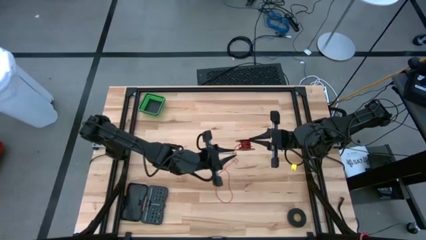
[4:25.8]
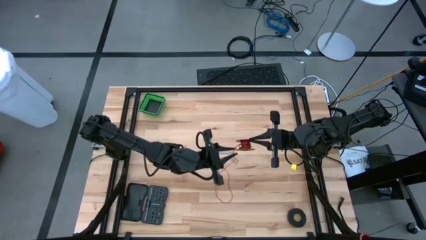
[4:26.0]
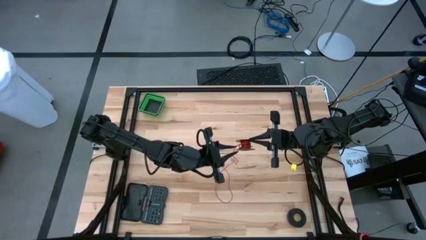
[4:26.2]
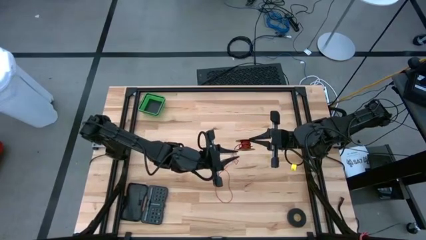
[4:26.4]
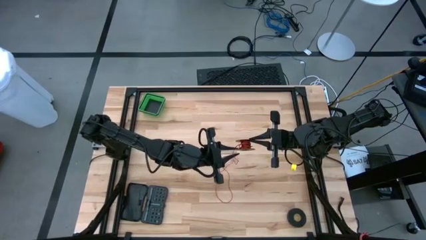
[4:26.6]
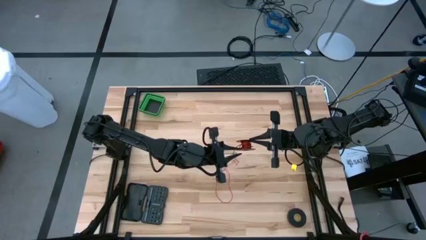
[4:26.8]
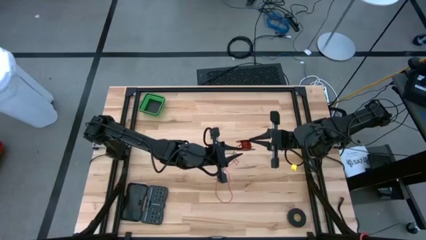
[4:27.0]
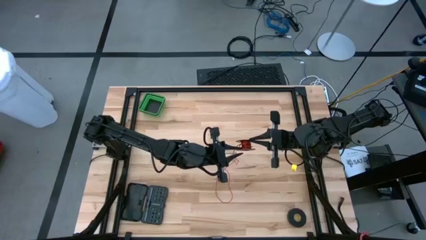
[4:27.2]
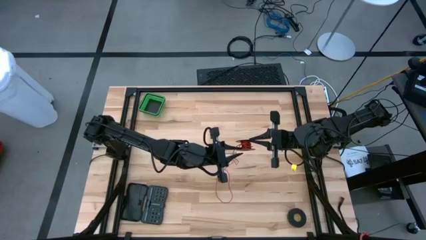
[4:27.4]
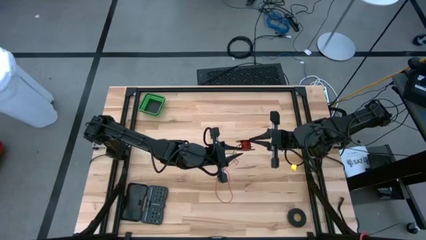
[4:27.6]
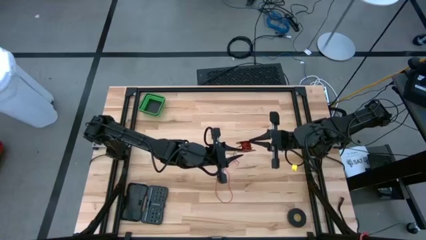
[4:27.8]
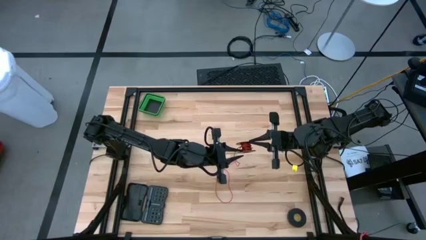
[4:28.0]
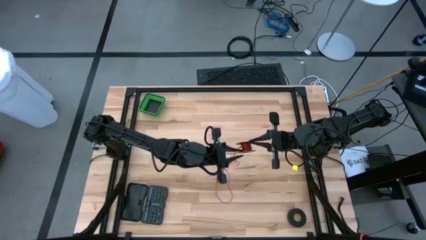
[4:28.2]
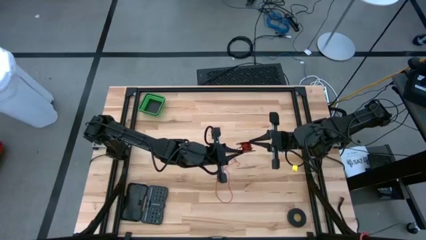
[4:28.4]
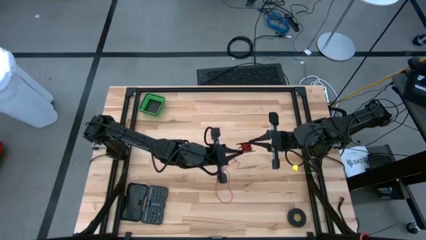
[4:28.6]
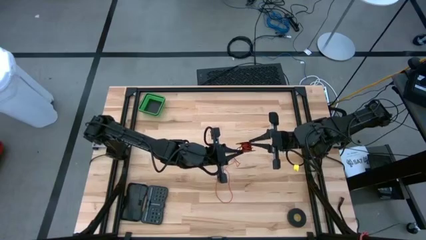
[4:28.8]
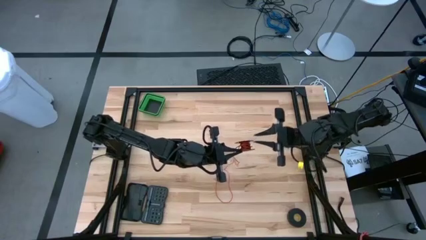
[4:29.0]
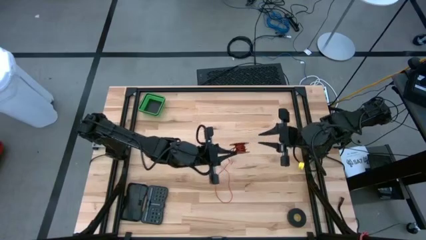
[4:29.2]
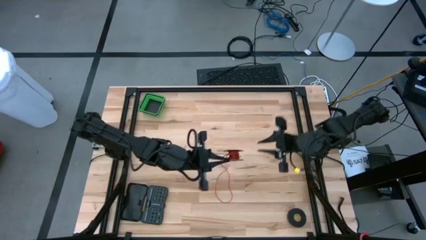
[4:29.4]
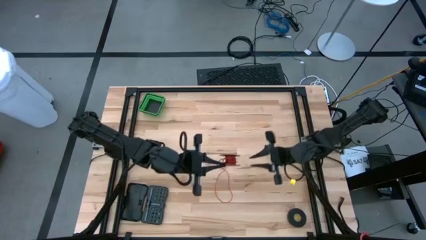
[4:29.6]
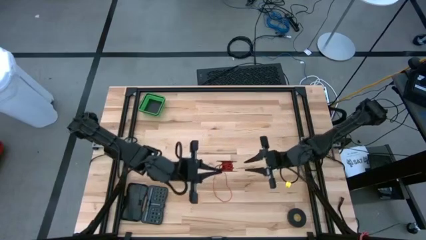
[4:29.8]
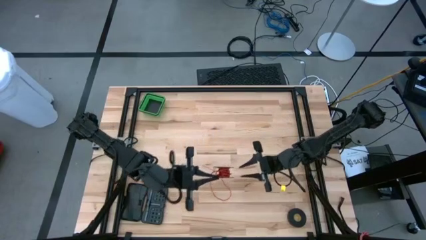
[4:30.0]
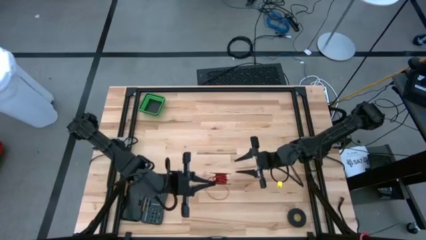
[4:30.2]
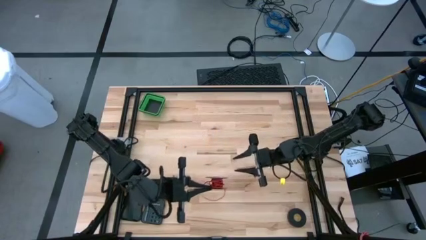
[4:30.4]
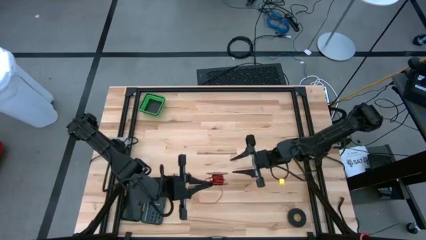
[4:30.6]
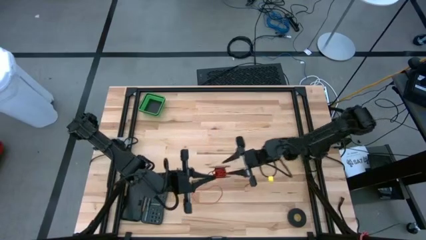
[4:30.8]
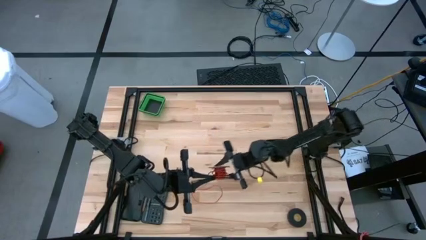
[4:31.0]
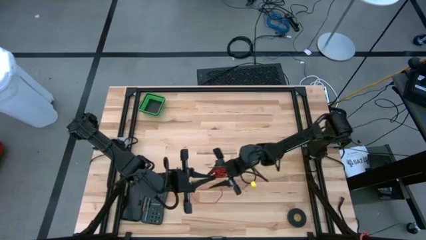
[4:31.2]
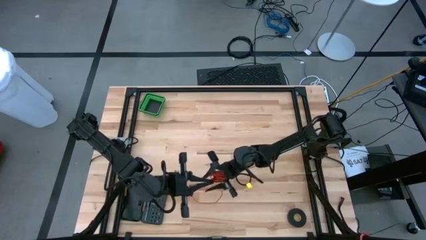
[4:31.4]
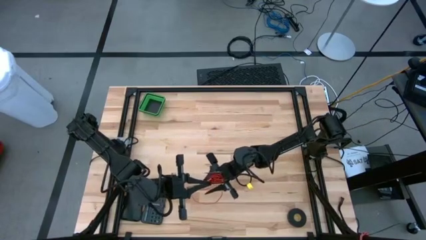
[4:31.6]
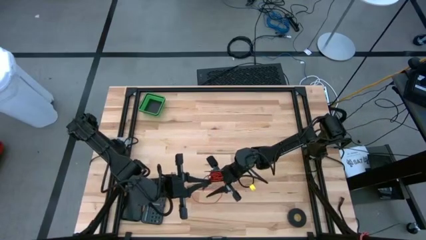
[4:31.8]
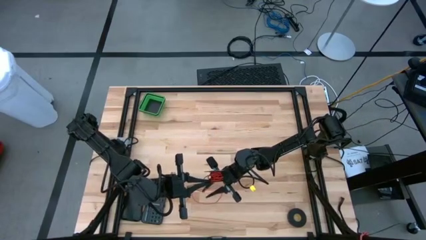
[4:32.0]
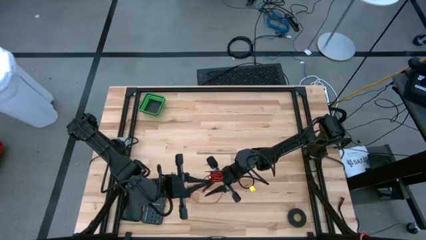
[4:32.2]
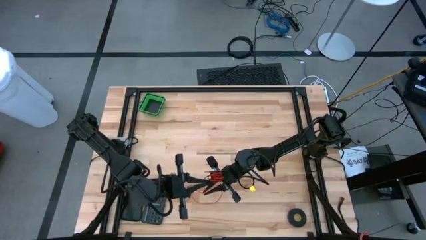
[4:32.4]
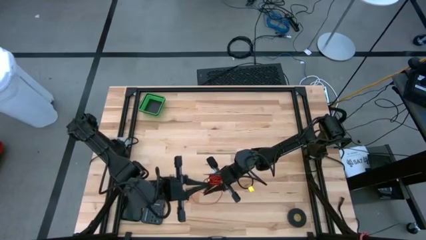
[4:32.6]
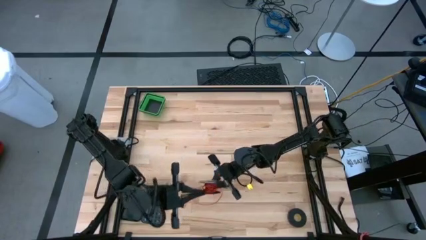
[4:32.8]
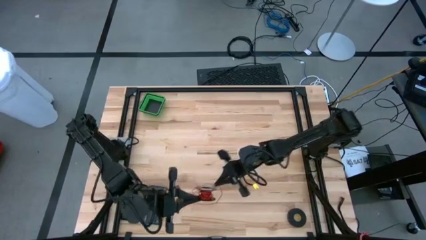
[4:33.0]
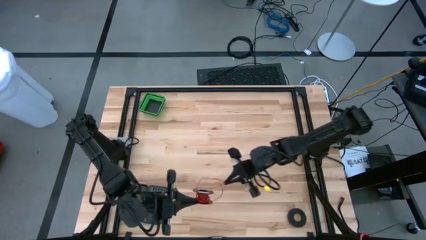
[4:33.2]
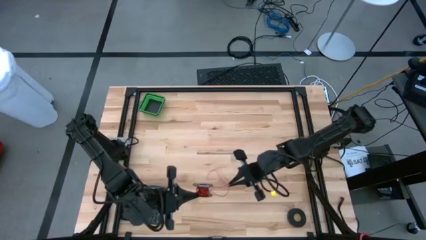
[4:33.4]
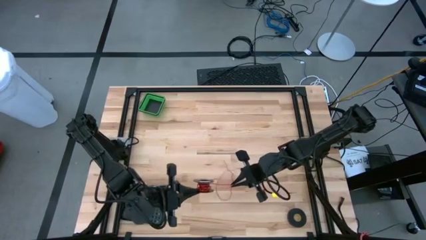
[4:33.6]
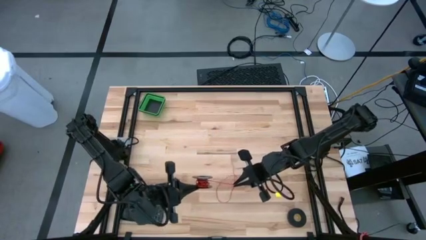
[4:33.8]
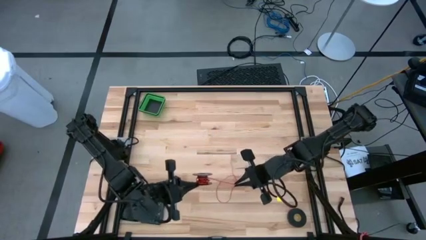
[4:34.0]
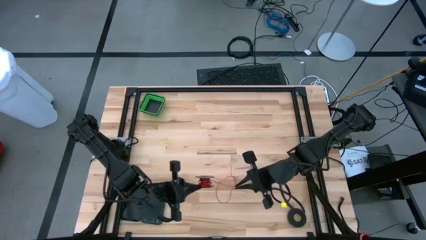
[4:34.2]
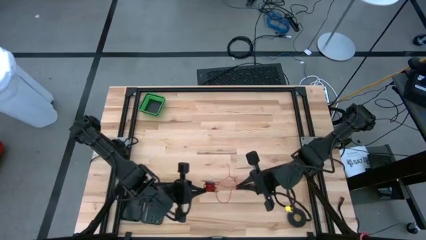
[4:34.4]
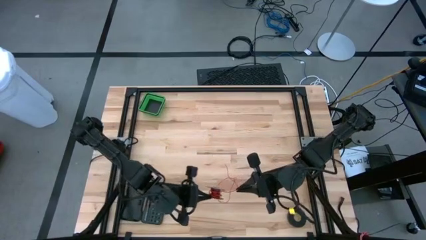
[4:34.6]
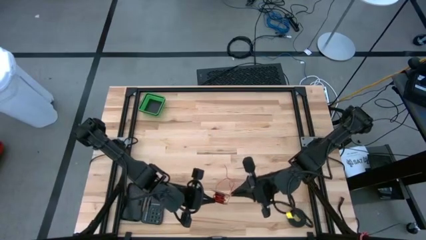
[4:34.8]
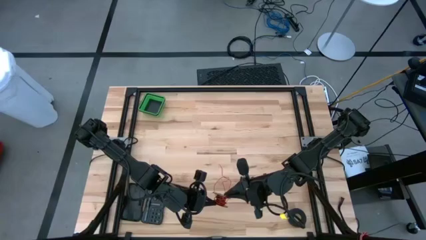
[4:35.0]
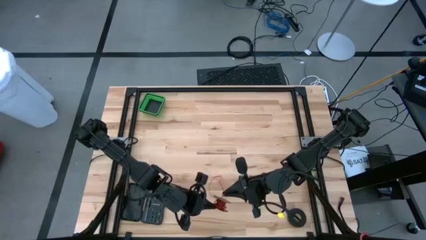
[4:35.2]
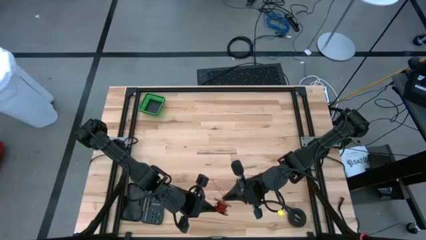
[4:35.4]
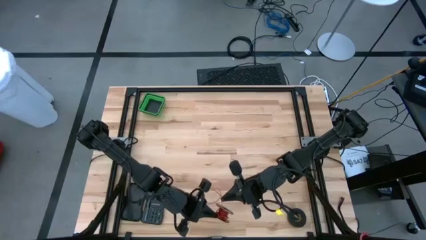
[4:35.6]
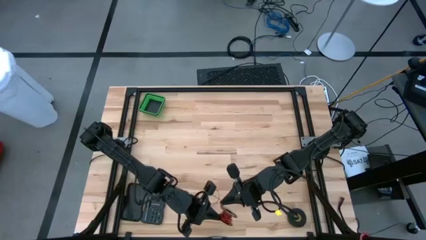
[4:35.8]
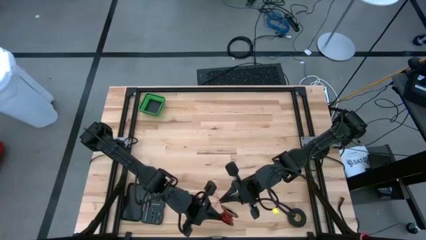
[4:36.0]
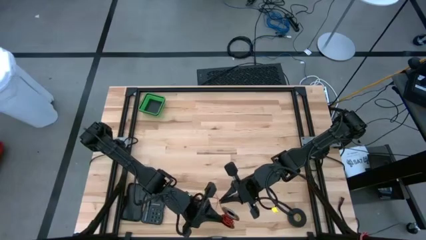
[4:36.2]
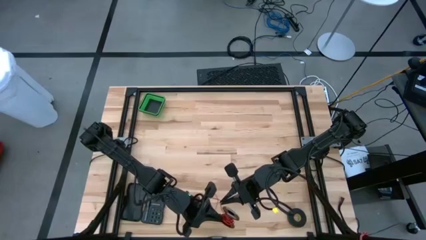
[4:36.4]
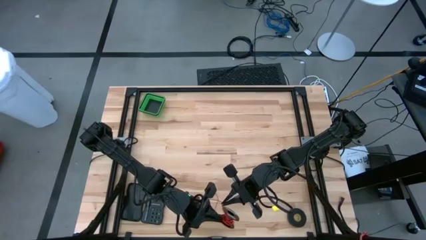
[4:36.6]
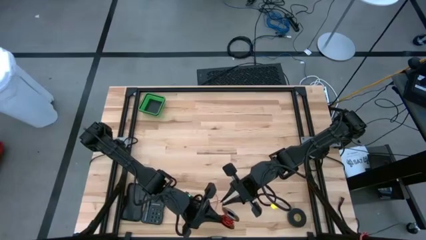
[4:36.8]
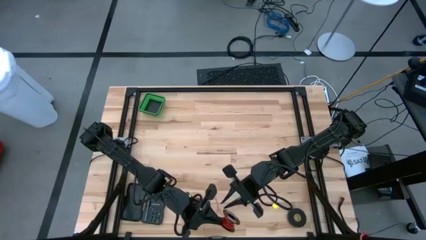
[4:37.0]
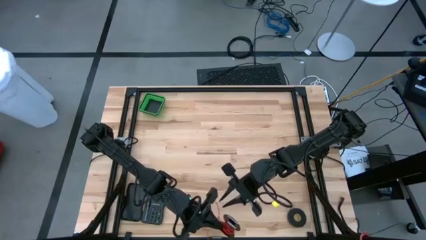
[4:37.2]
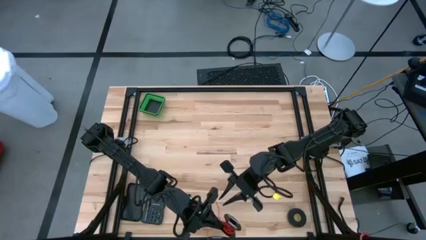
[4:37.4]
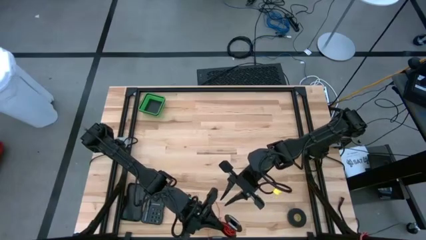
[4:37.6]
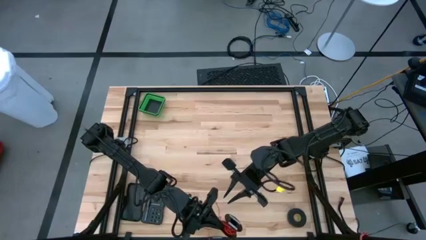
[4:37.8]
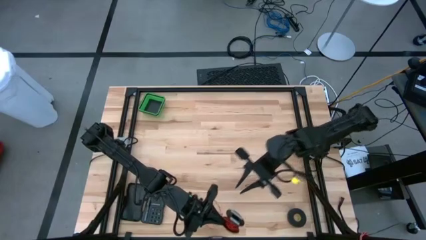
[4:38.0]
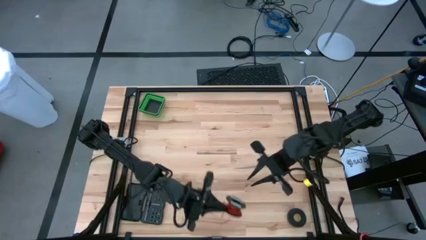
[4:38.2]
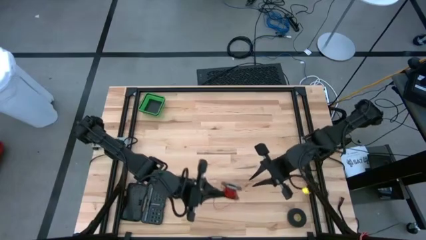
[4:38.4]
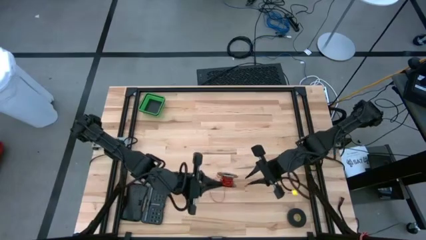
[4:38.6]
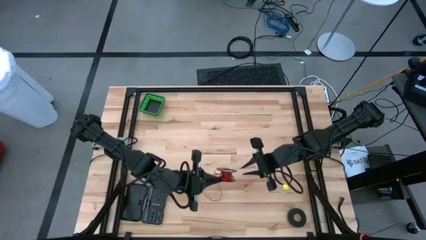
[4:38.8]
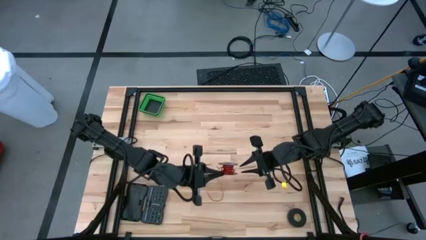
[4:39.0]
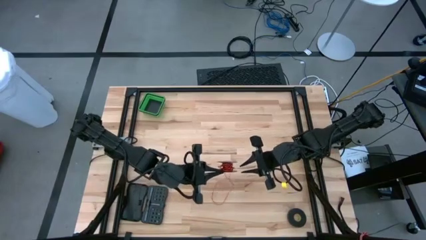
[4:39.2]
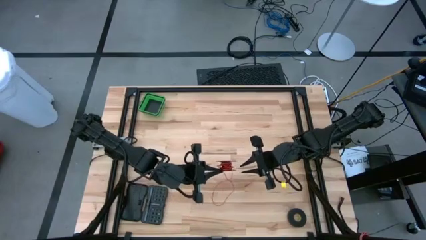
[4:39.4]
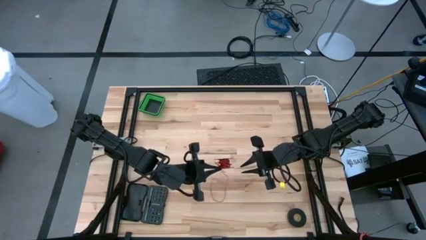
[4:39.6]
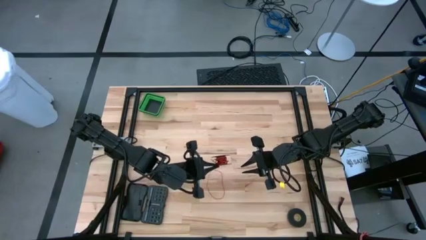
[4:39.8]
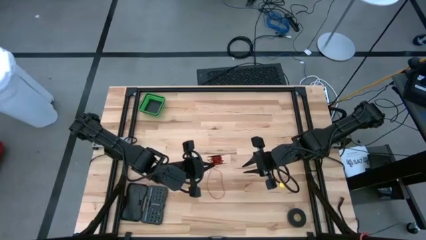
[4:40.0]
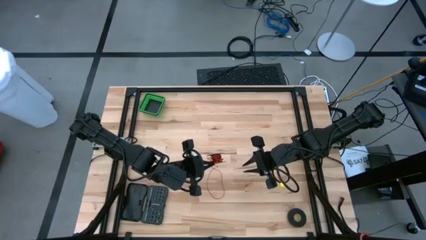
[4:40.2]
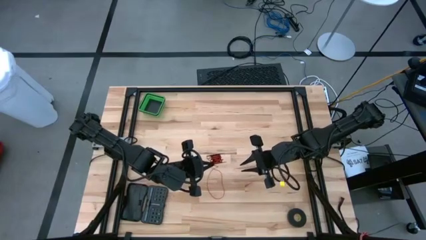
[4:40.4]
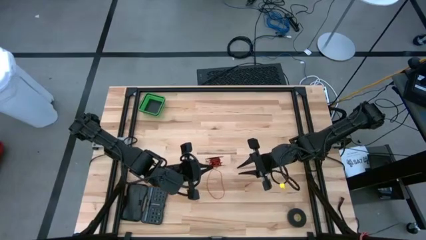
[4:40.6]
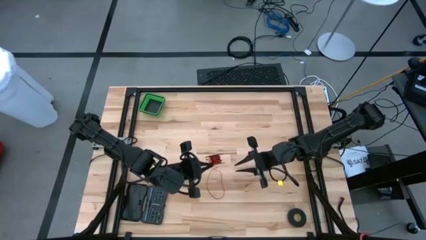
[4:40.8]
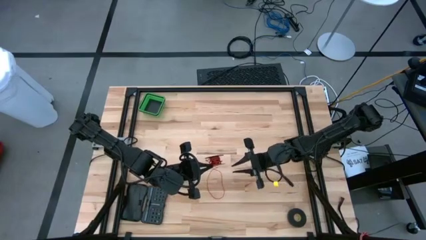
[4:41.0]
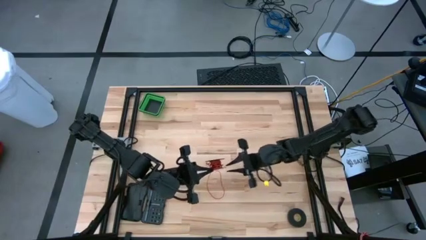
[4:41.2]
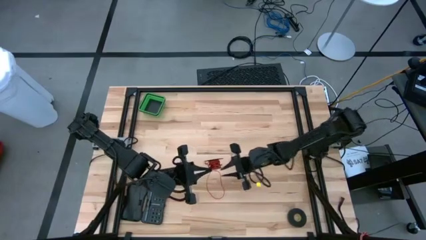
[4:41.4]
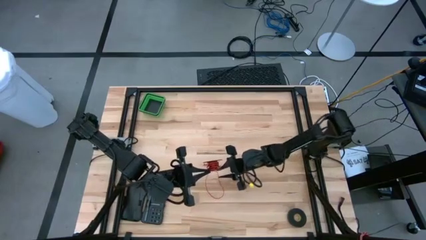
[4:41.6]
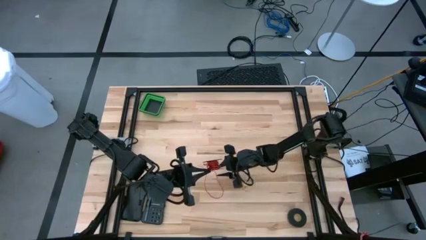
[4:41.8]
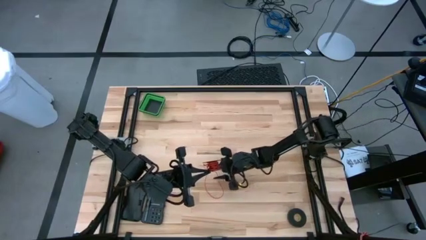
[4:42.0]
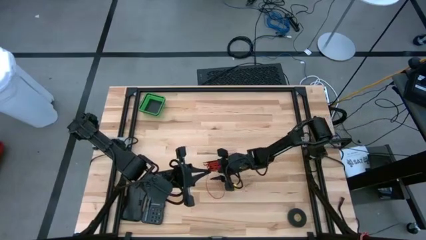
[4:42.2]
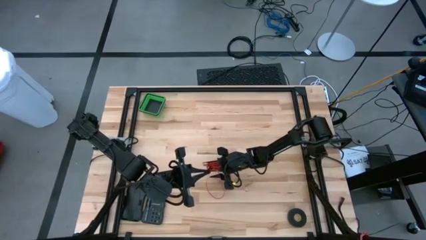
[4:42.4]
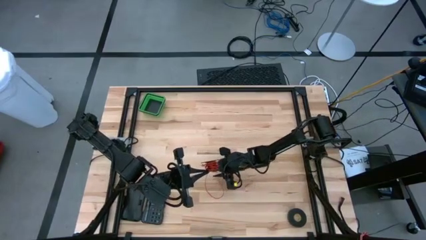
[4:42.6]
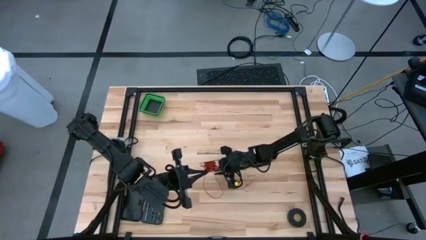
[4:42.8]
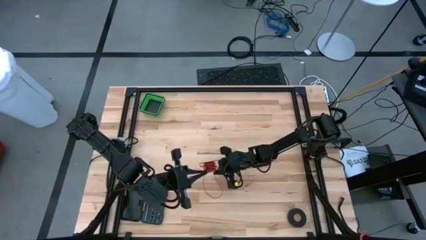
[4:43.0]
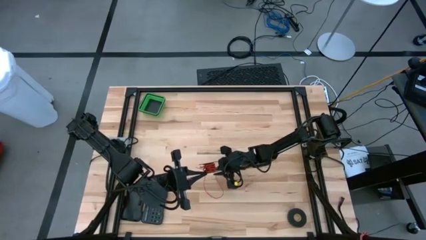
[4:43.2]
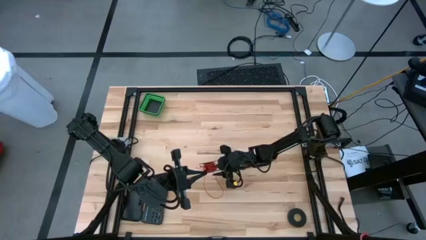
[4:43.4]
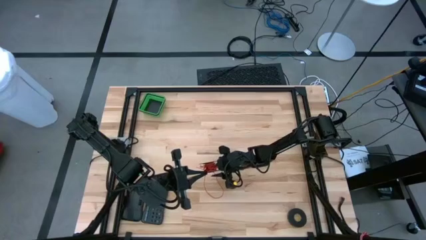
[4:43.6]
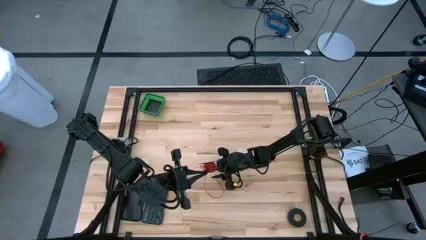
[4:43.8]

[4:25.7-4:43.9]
Task: Coil cords
Coil the red wire into the spool
